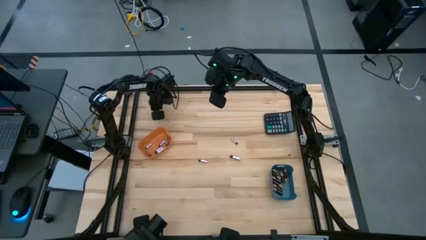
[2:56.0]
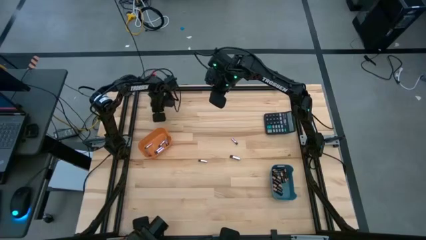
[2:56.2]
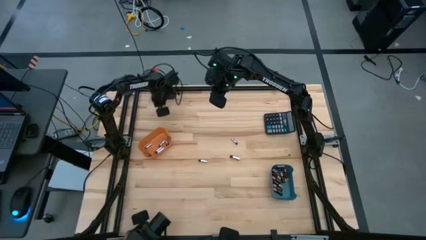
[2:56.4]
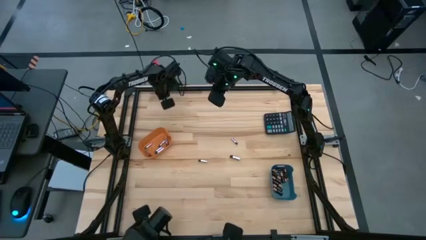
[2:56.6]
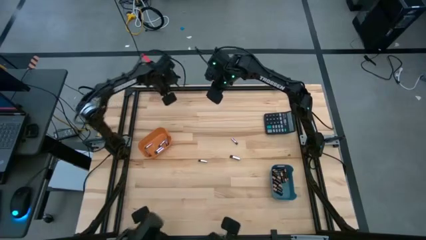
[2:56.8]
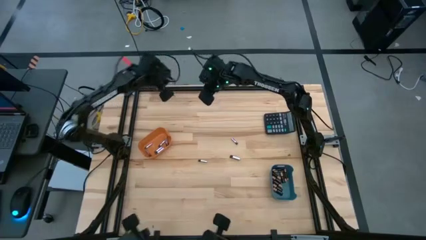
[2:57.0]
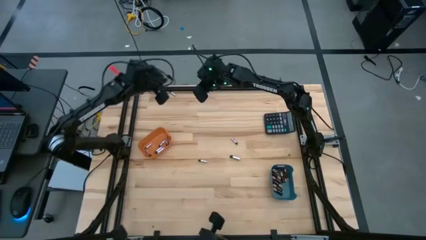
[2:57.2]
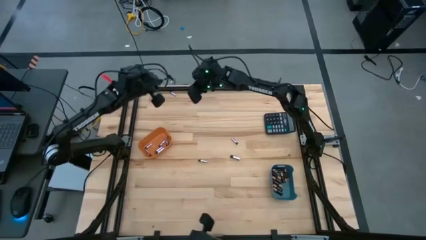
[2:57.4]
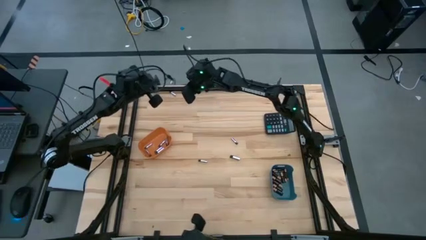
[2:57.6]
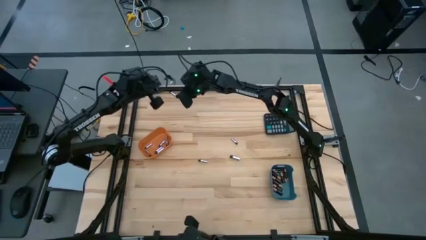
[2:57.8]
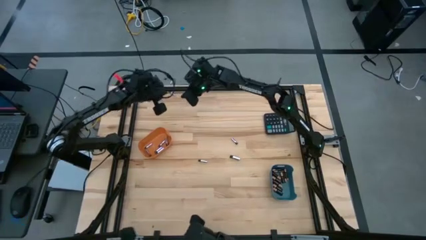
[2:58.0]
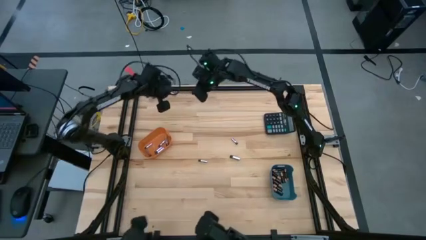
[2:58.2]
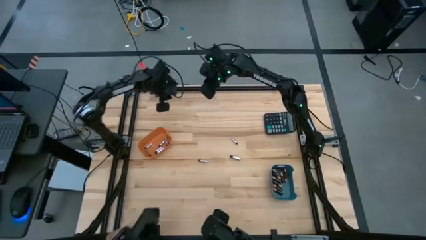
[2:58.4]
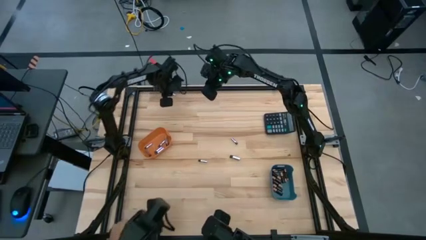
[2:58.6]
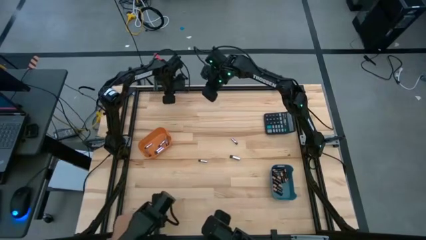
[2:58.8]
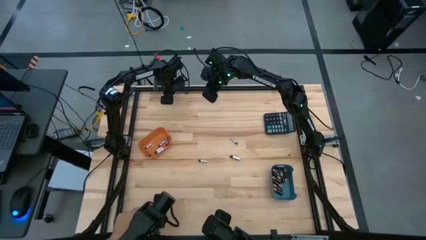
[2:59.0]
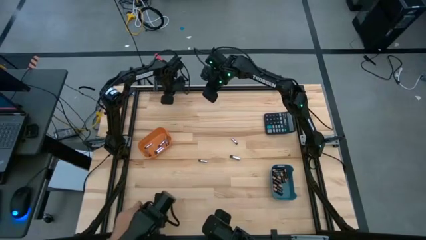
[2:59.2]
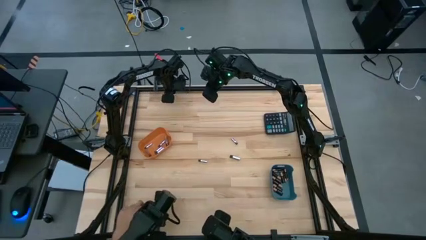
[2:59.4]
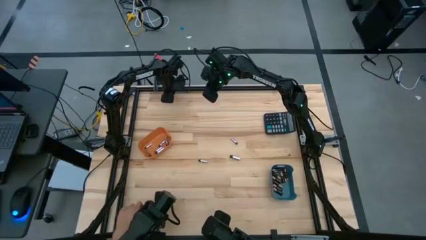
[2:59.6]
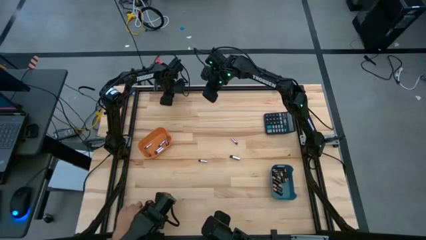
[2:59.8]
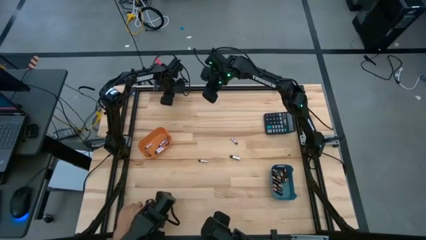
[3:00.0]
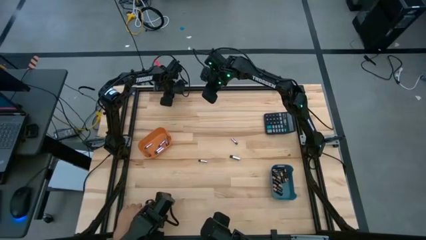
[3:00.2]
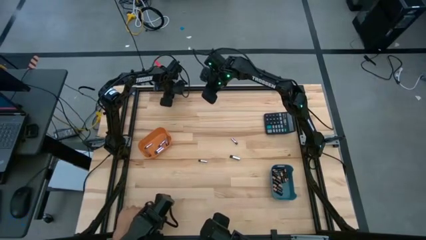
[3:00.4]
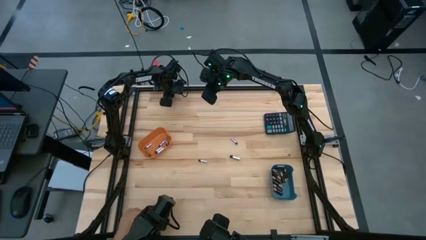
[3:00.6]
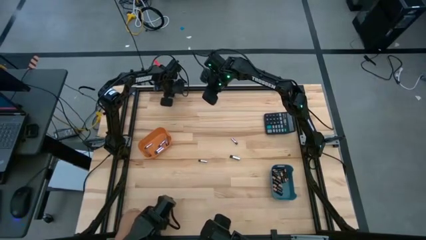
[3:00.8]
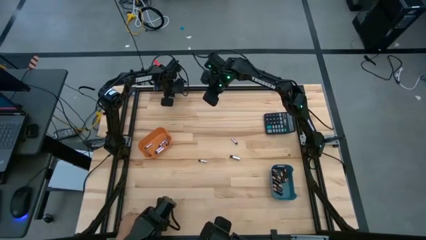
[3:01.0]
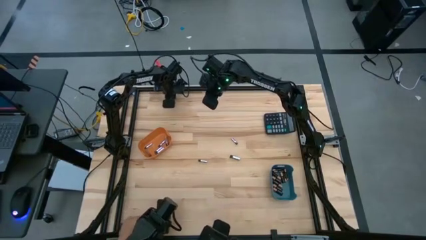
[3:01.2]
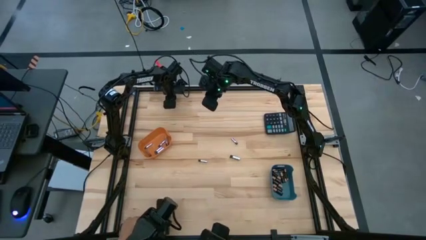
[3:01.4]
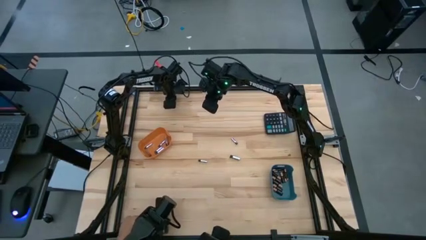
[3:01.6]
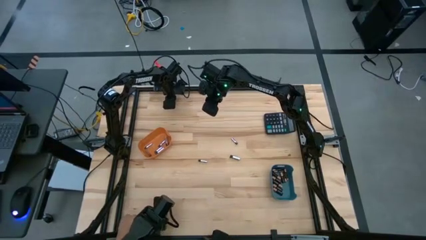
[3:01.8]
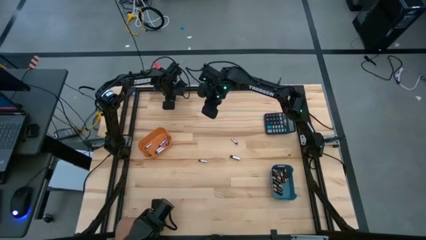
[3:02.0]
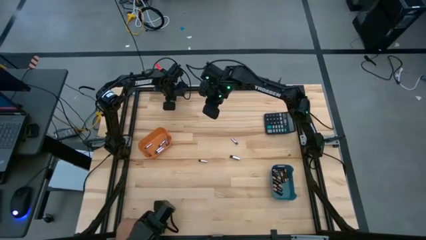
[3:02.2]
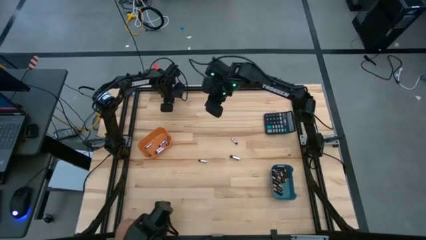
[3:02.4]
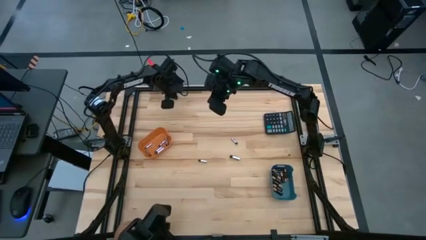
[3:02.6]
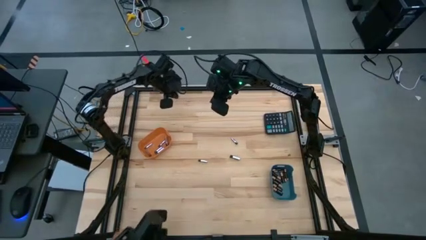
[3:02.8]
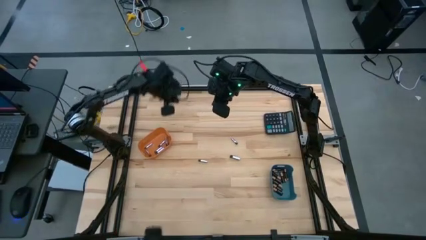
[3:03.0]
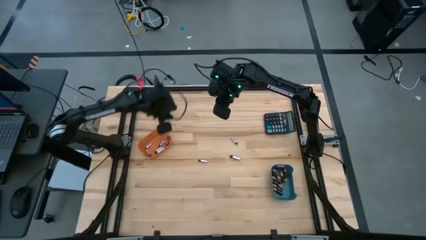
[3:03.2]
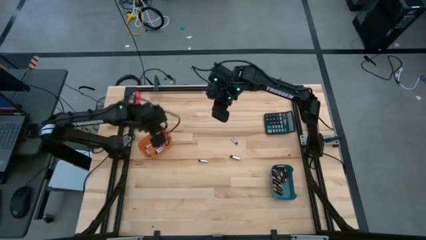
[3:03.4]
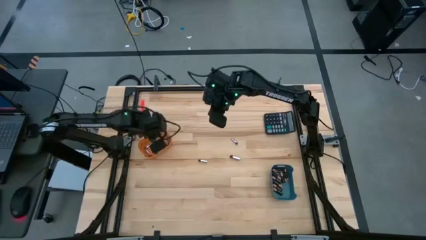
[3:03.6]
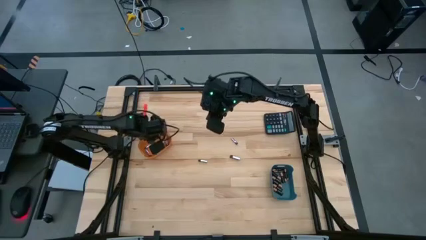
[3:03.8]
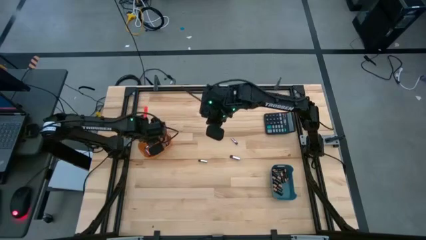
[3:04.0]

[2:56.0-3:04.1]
Task: Sort batteries
Put the silver battery into the orange bin

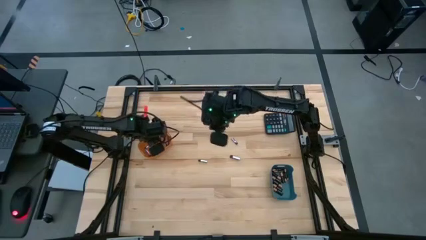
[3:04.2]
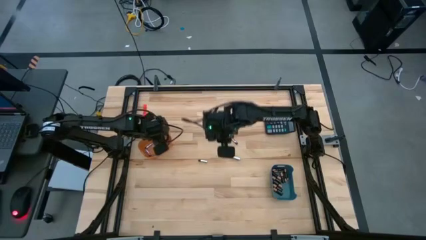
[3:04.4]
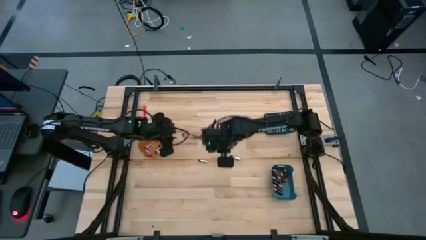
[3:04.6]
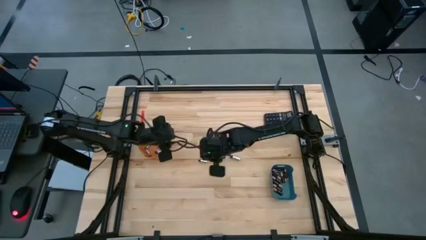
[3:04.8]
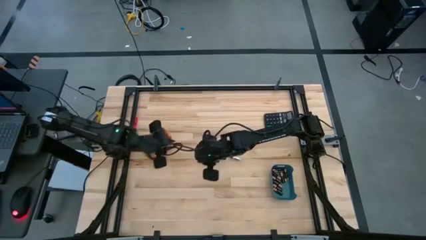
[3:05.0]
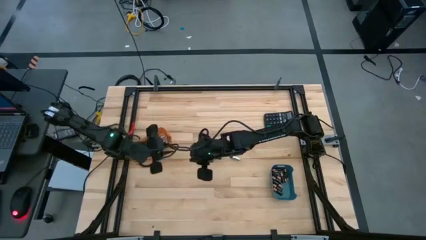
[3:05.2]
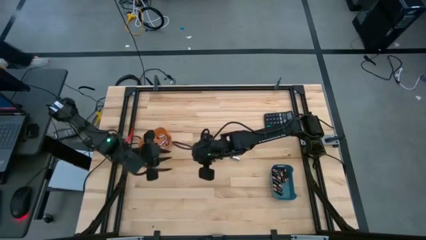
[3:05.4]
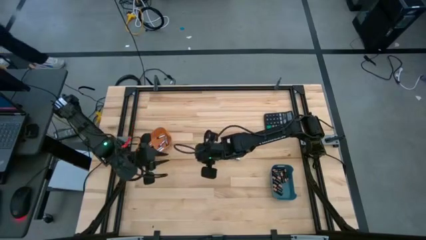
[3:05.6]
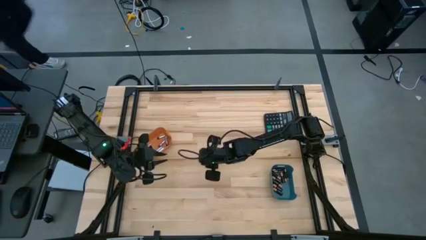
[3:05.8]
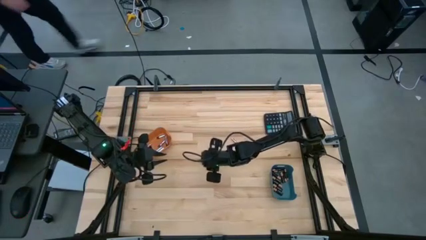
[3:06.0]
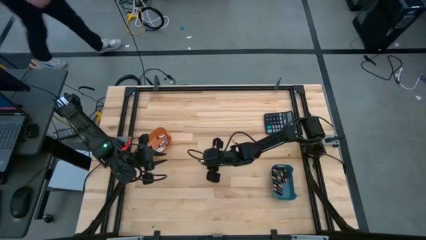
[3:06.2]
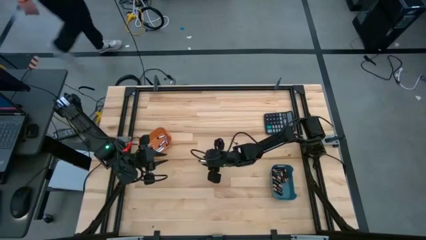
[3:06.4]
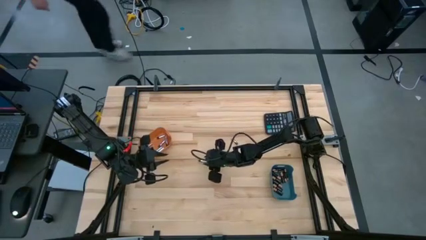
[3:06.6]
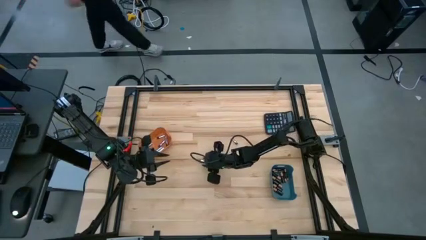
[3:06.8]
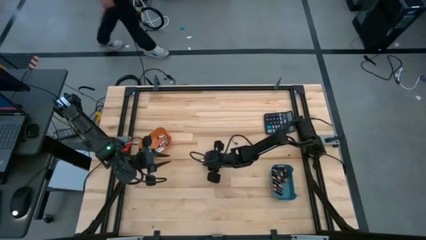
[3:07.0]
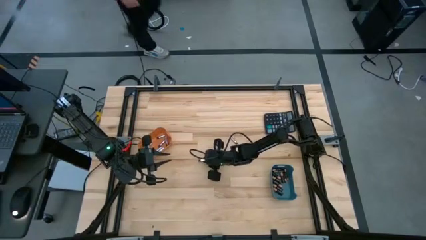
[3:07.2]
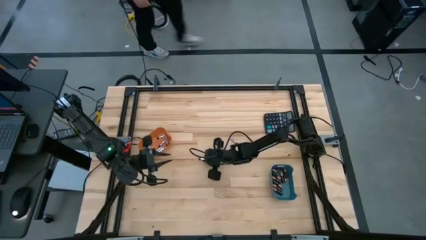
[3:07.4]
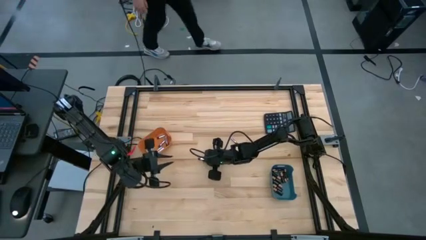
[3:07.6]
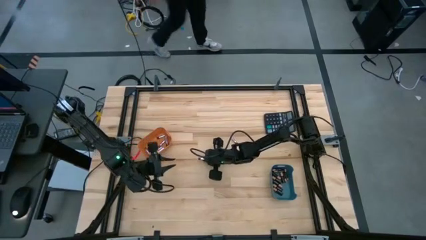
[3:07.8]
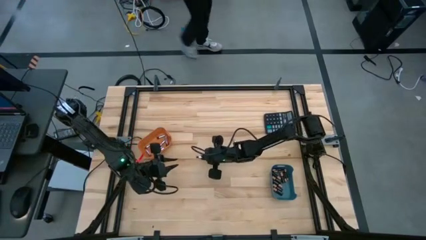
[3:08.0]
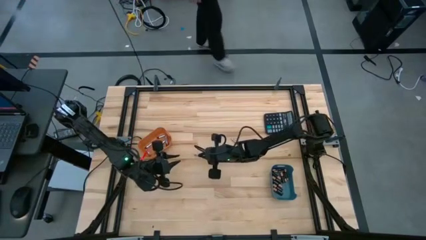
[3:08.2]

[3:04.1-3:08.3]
Put the silver battery into the orange bin

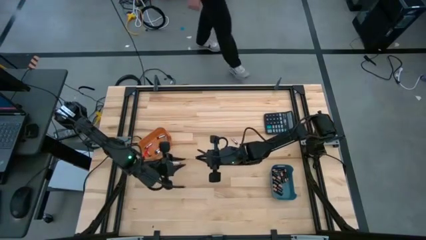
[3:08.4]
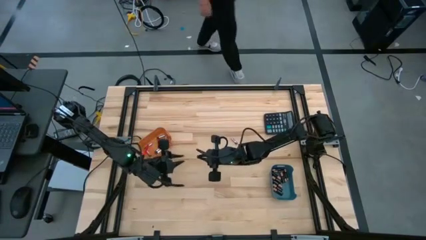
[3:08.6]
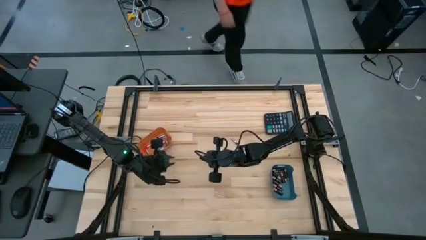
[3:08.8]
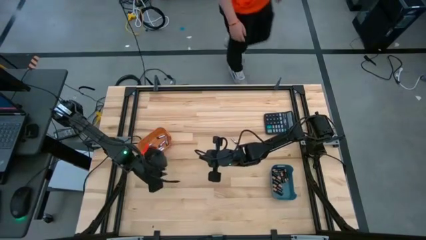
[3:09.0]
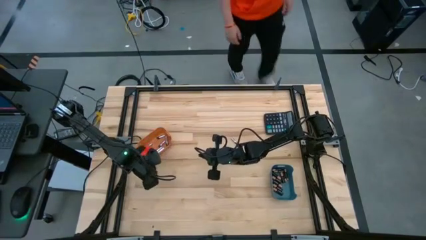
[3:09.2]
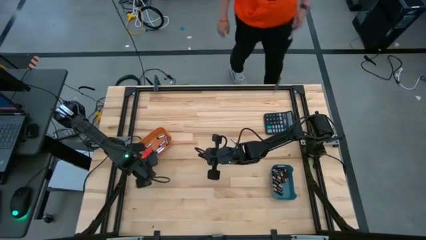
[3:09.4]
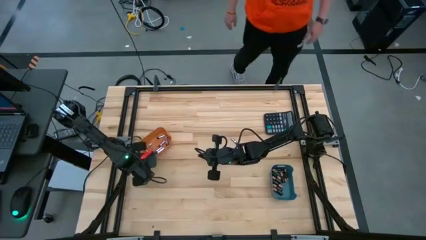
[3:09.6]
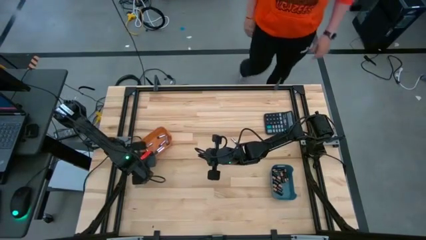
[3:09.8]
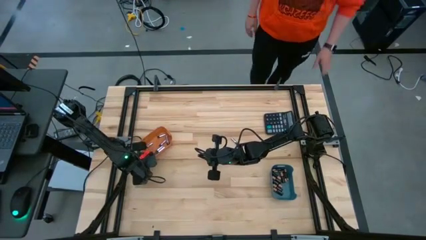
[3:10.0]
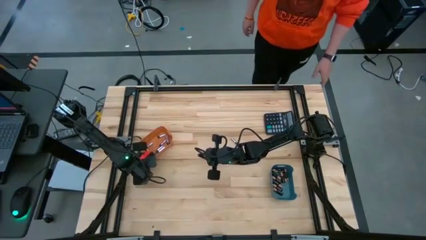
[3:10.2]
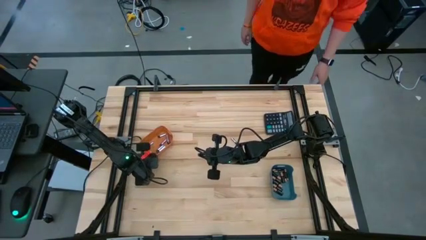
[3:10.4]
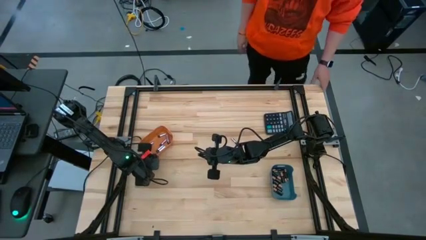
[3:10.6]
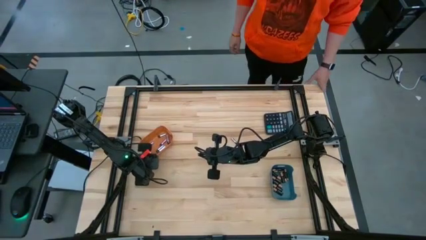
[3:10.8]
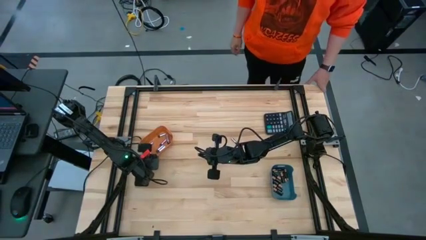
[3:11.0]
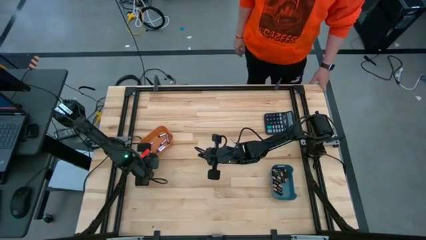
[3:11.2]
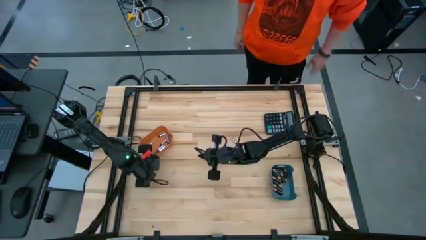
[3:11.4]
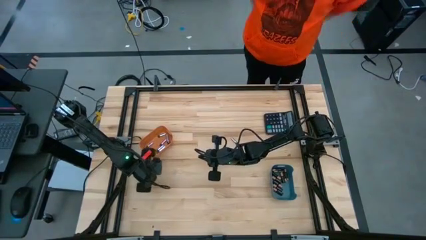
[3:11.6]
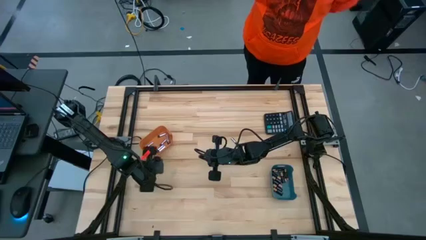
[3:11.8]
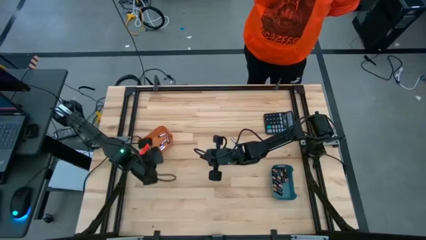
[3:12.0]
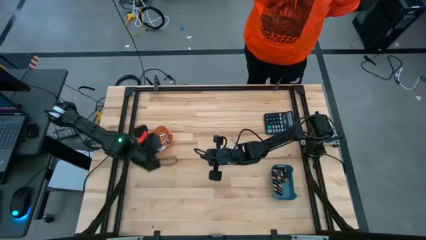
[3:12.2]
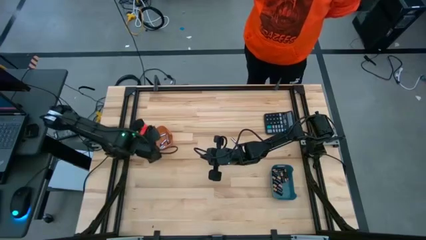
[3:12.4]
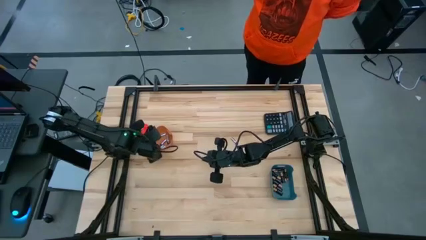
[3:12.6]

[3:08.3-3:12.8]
Put the silver battery into the orange bin
